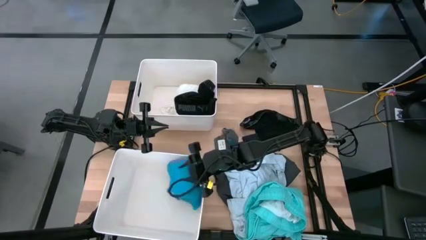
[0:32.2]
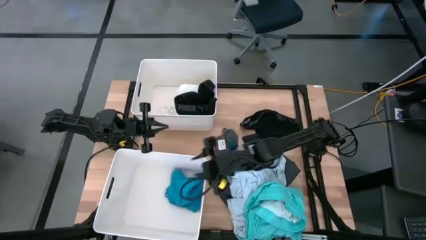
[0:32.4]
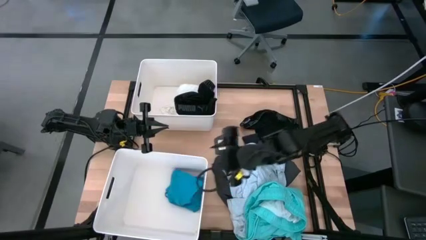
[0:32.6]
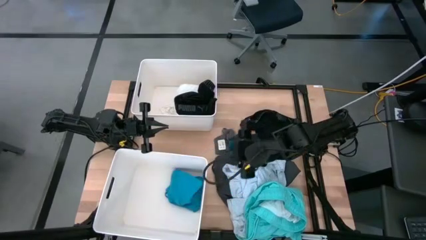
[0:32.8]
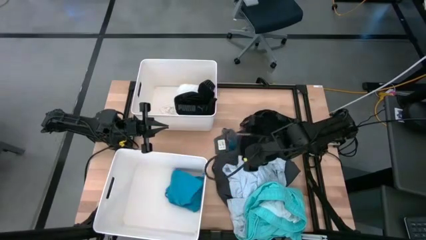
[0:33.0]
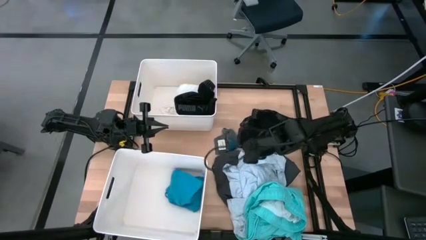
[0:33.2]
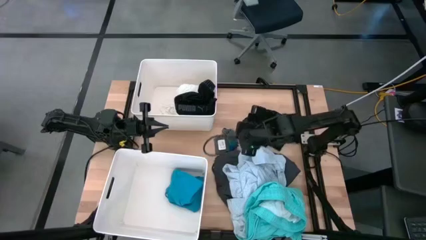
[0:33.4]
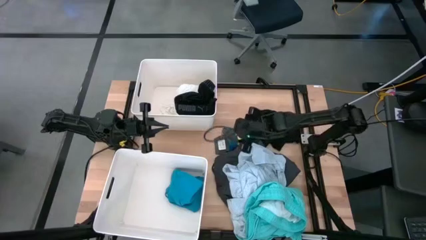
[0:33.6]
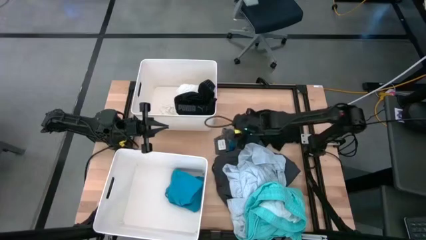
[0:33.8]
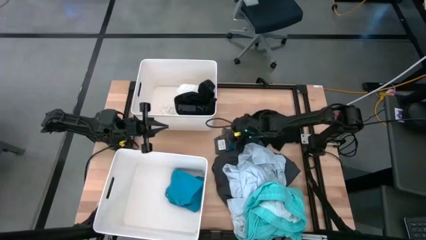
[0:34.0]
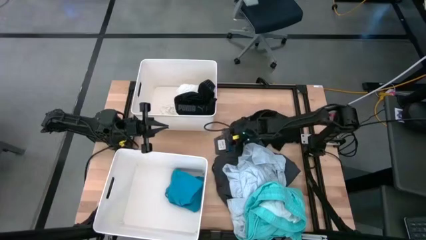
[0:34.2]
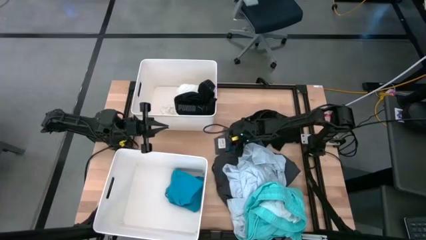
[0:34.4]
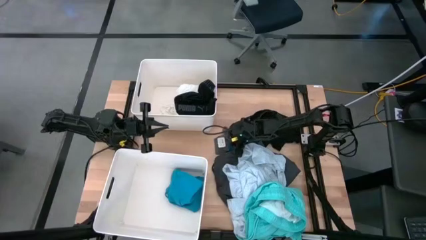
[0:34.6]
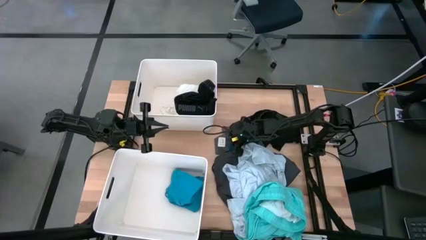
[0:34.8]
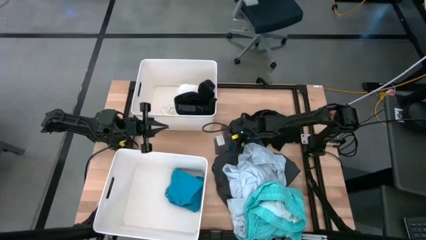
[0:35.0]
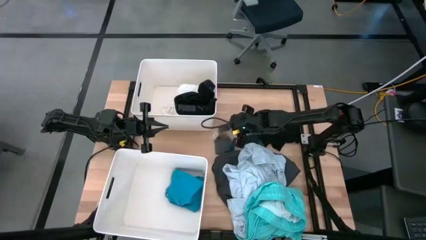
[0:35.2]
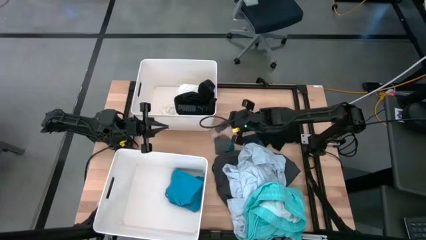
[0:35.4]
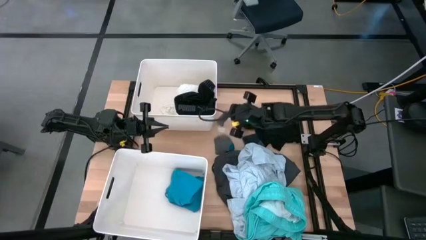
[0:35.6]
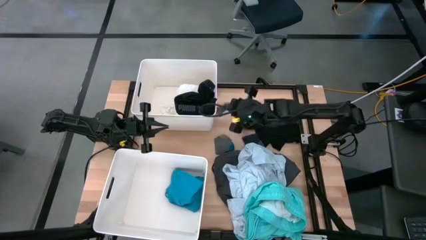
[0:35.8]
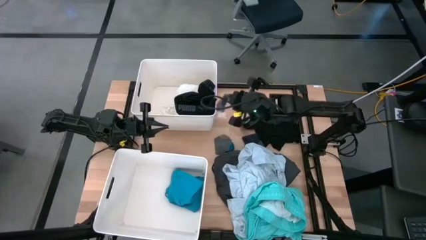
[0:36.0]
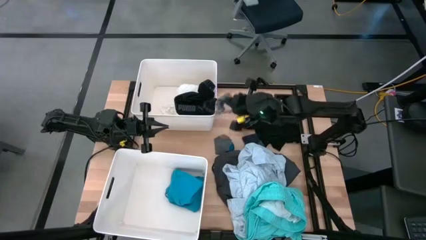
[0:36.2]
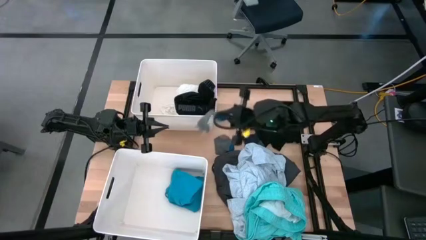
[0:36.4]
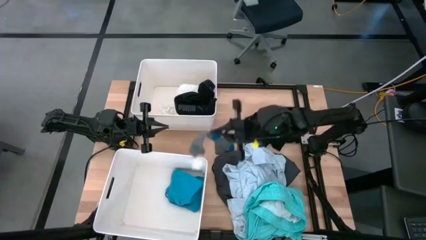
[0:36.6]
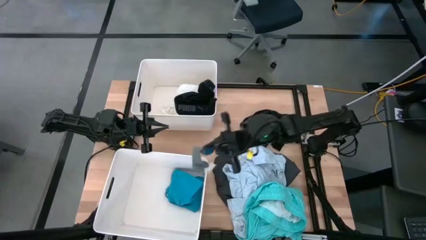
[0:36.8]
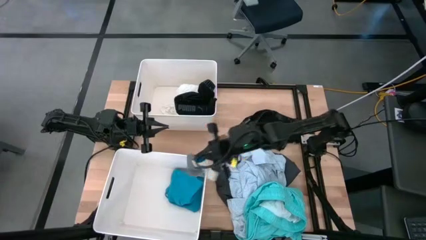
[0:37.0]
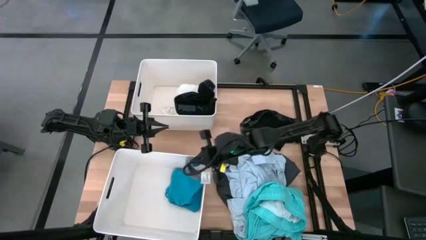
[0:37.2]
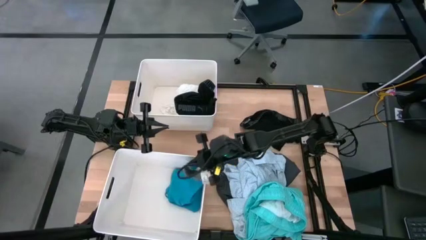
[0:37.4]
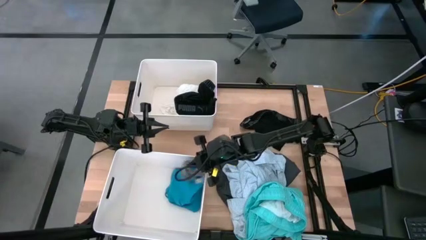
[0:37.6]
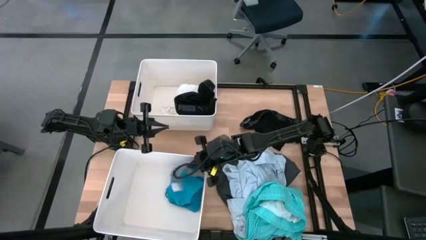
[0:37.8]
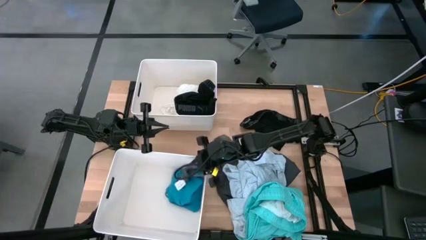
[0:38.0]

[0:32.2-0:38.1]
Task: Sort clothes
Put the gray sock into the bottom laundry organizer

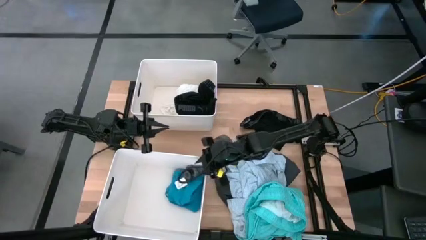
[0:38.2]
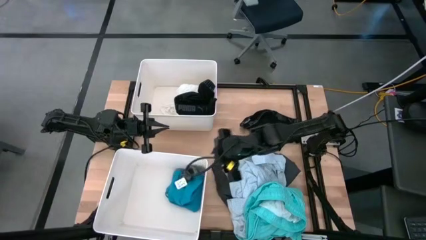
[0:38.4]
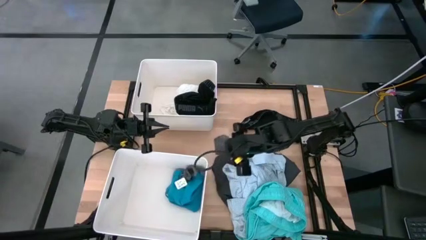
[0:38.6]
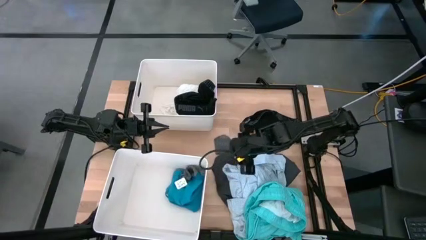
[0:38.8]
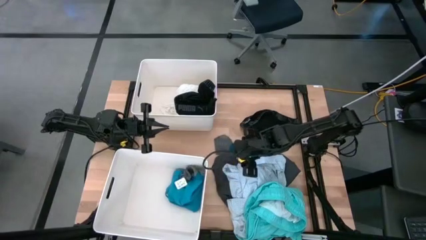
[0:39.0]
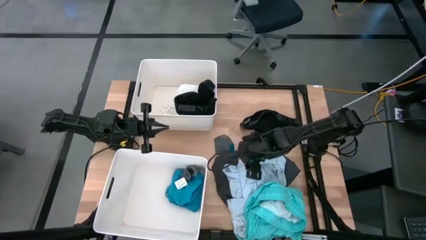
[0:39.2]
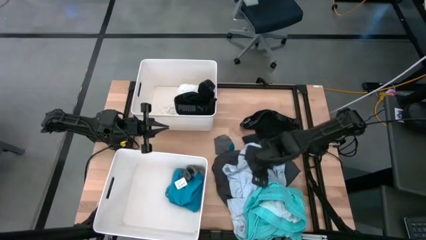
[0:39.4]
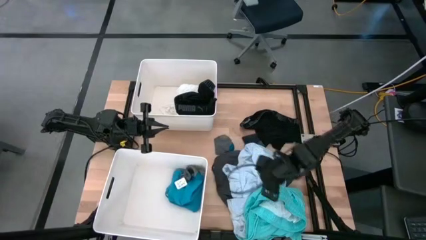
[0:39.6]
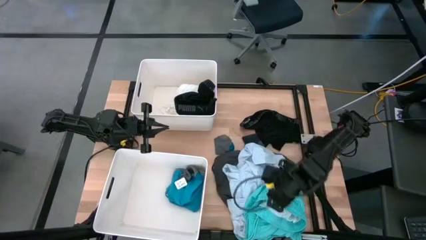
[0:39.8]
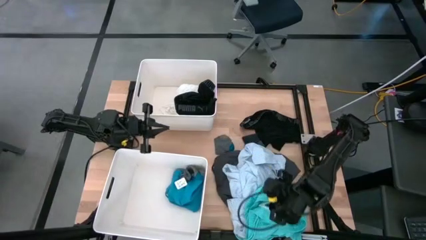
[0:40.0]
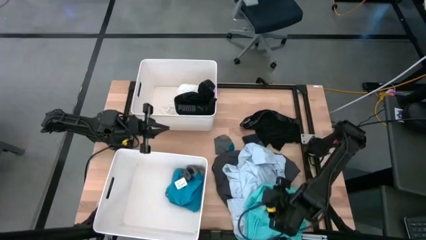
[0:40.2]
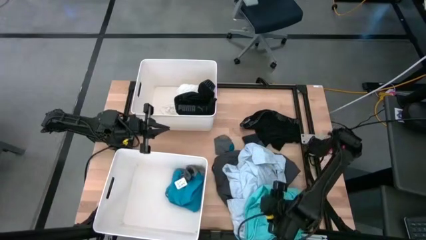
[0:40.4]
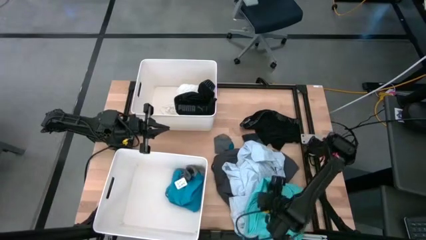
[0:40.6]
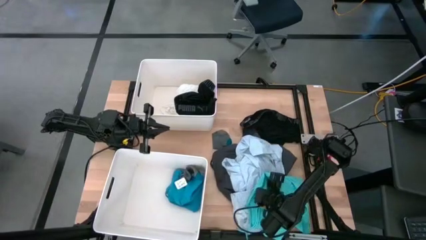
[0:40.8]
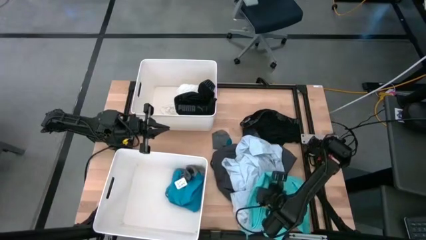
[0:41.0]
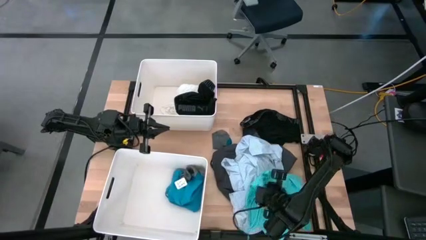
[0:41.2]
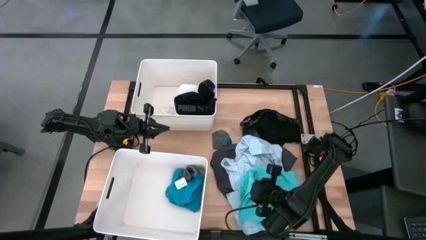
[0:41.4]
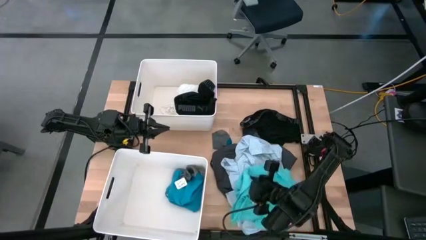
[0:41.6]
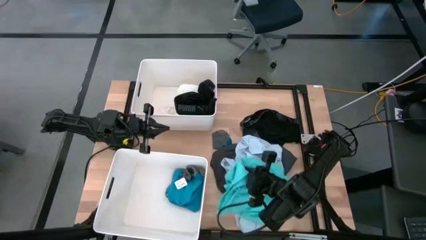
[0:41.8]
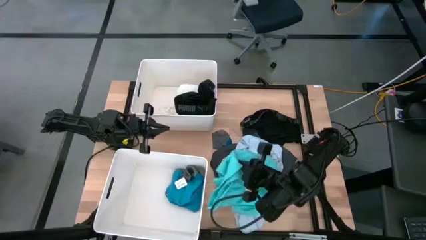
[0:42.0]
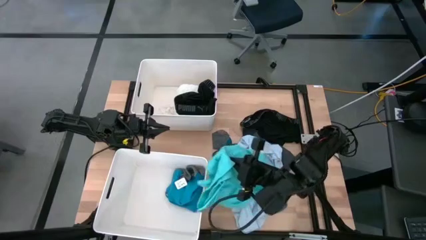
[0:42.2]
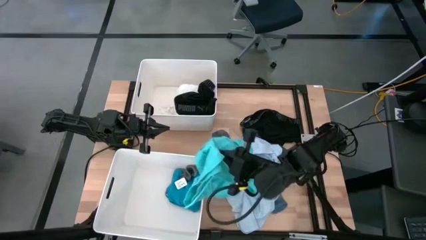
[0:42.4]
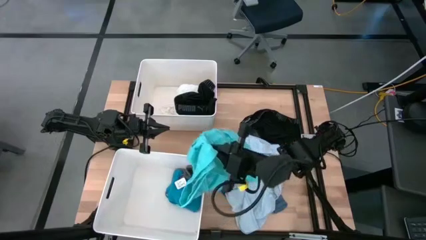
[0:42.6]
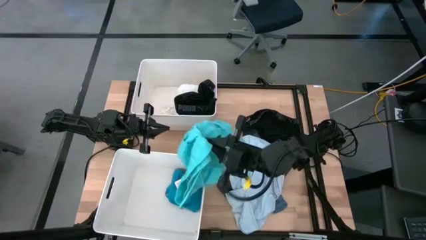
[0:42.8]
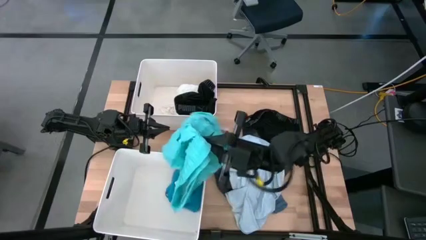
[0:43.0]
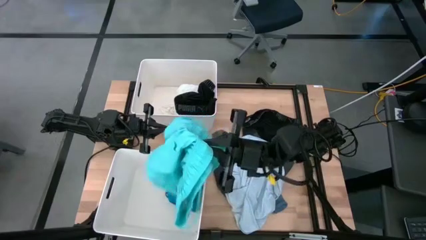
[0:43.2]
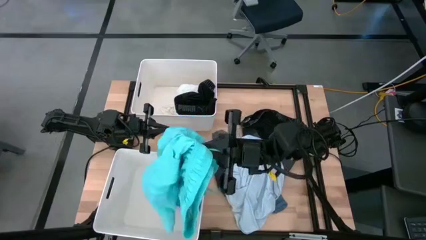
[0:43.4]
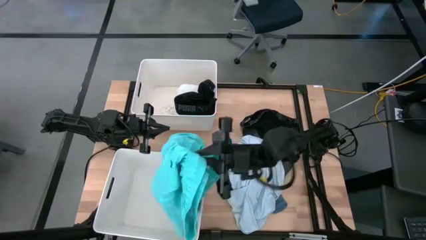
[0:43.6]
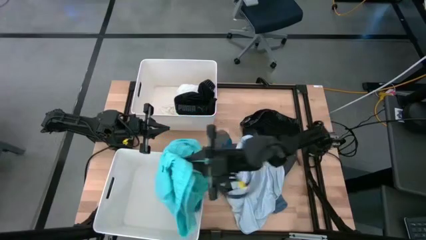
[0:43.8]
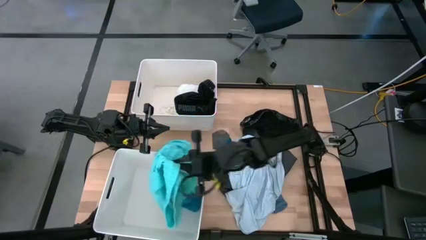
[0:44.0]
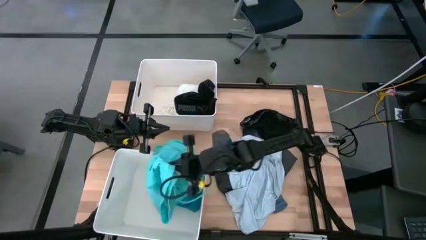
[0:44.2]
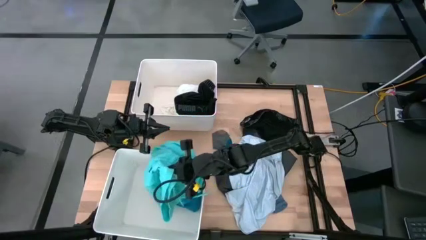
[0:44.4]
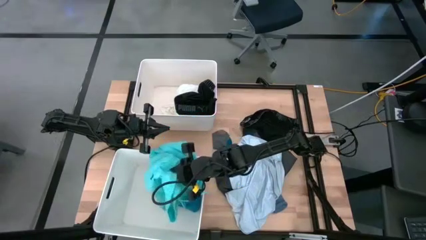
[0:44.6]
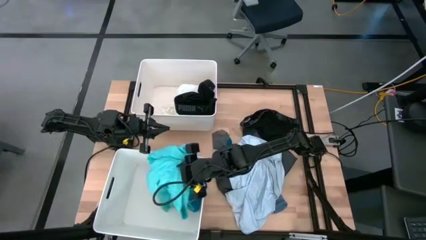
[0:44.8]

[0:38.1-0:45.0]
Put the light blue short into the bottom laundry organizer

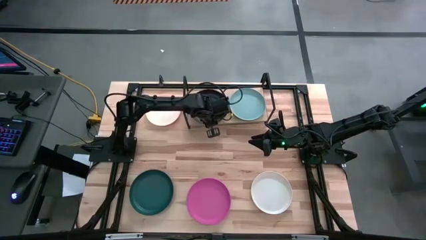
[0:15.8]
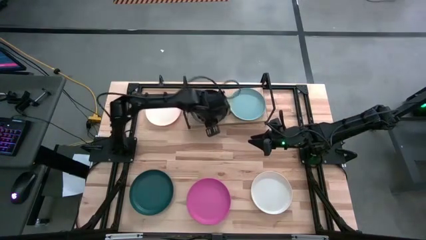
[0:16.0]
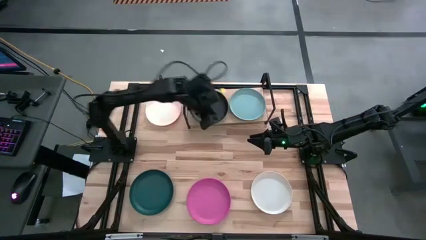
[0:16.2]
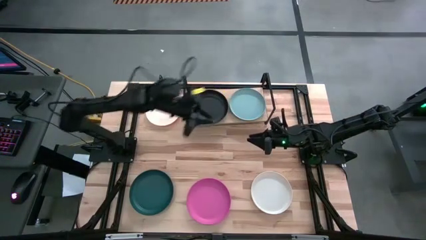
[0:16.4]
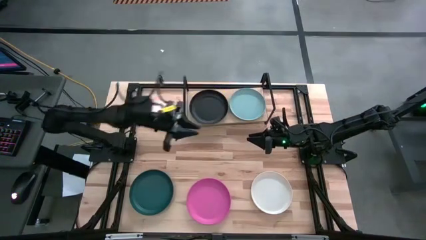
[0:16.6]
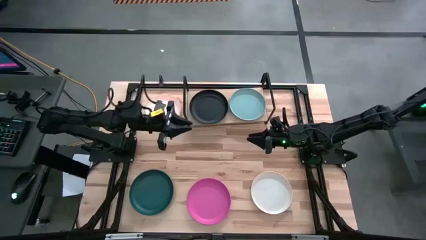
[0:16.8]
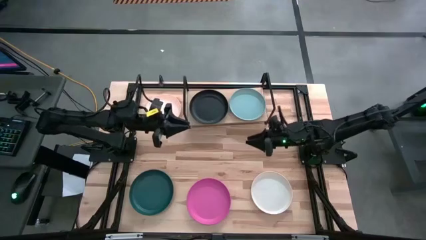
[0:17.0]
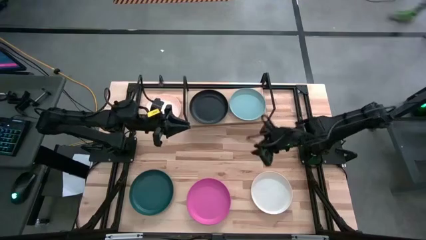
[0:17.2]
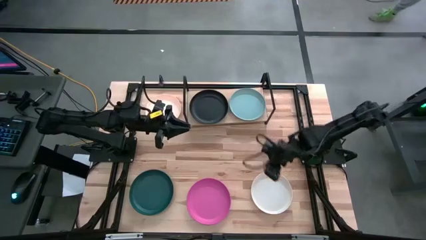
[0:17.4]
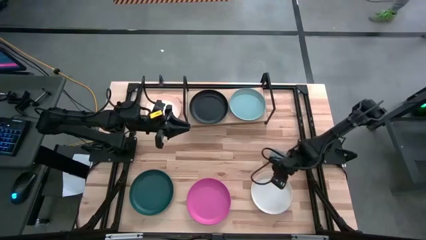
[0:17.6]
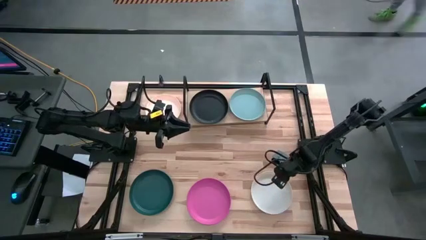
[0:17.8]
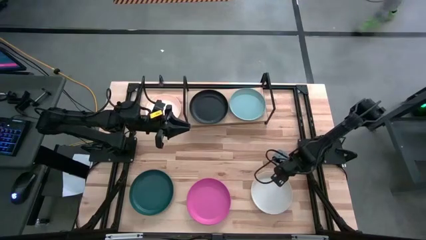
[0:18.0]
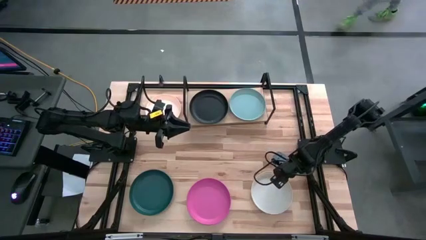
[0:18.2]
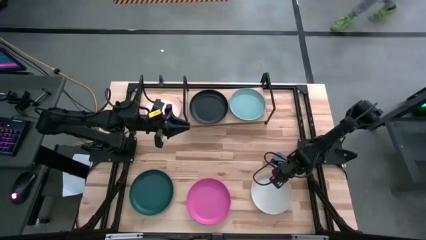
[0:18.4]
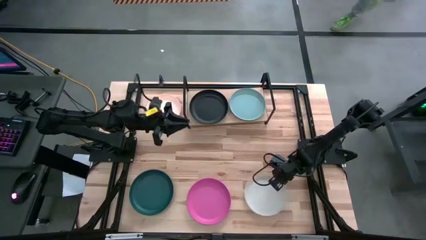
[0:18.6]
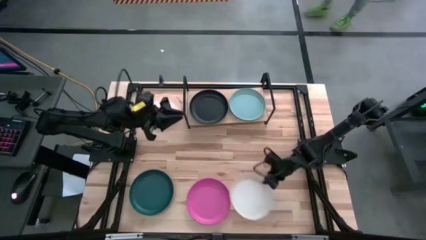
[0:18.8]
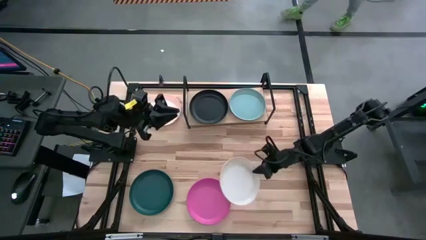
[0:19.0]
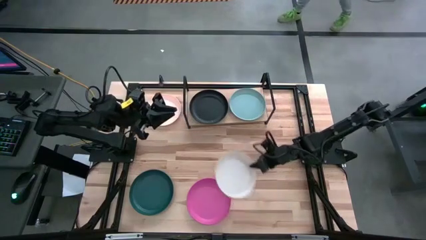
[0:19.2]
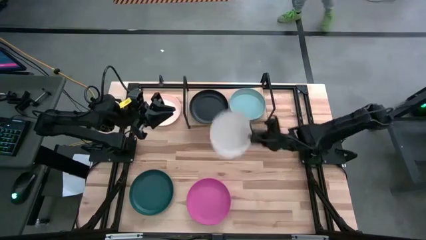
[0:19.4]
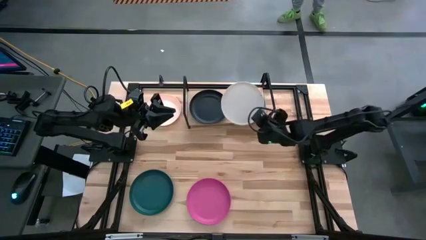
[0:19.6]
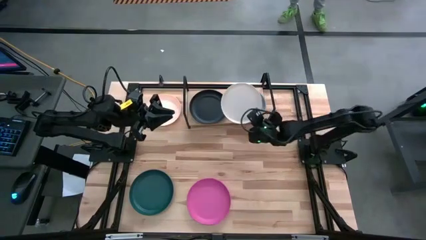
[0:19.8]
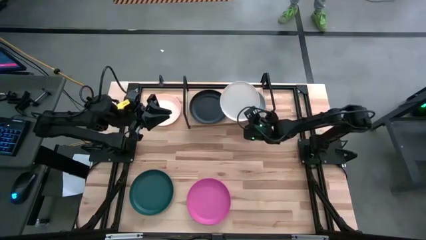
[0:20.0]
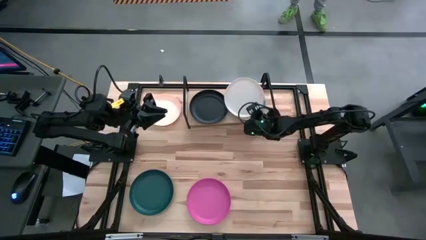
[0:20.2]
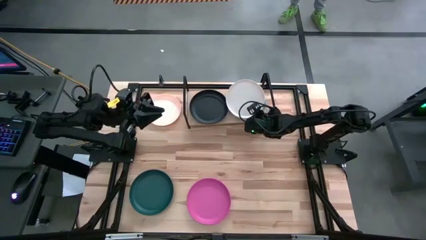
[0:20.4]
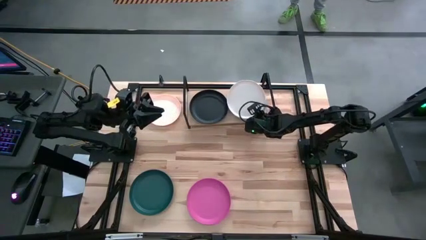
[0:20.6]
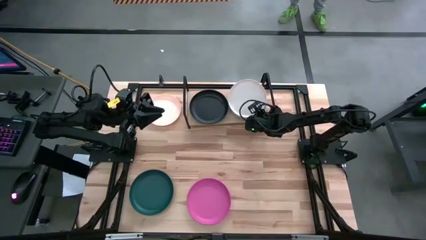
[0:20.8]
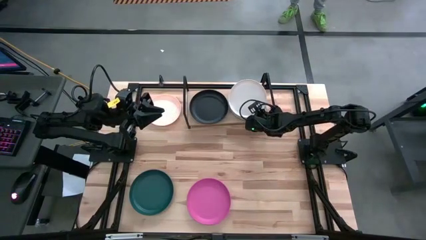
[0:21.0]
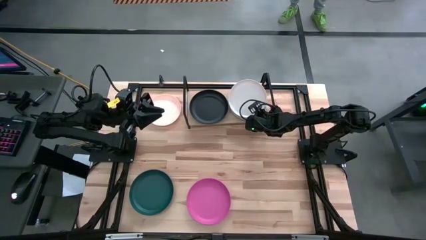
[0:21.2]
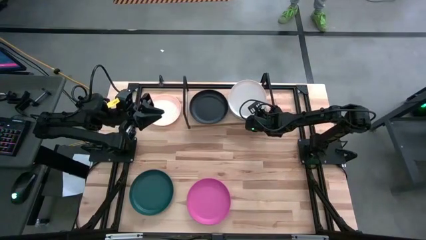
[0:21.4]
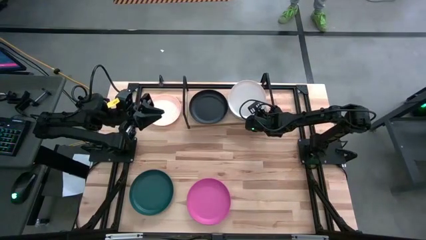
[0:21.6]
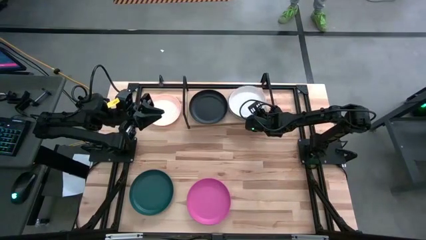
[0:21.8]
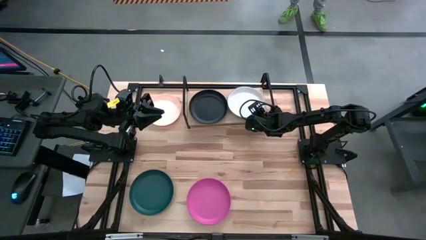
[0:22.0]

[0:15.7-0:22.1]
Task: Place and stack plates onto a shelf
Stack the white plate on top of the light blue plate on the shelf
